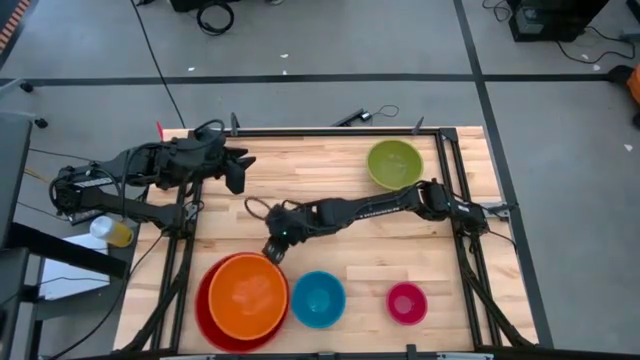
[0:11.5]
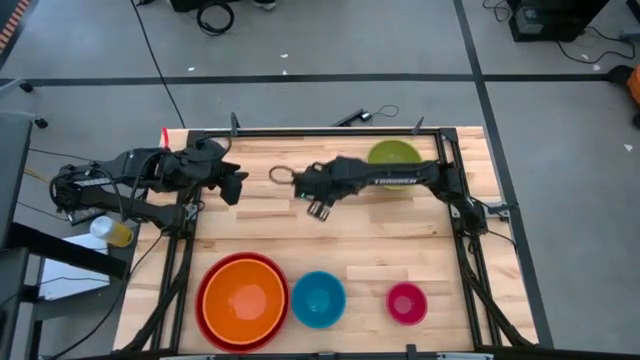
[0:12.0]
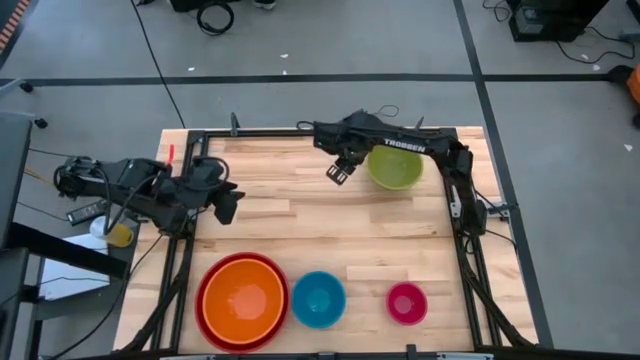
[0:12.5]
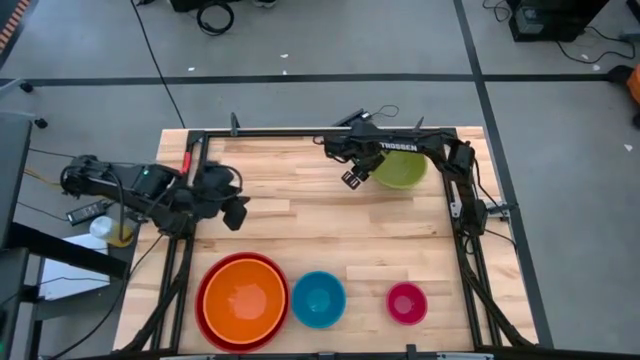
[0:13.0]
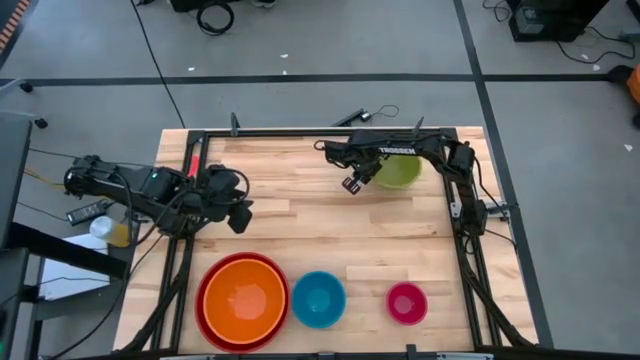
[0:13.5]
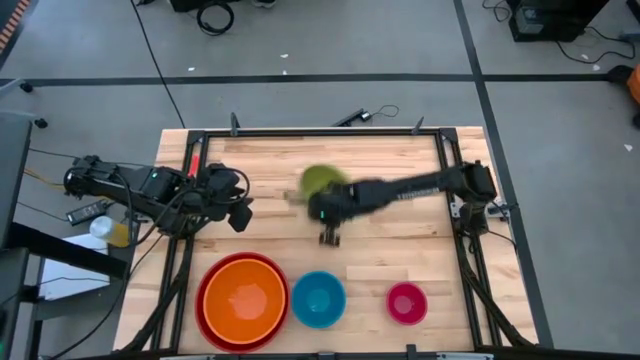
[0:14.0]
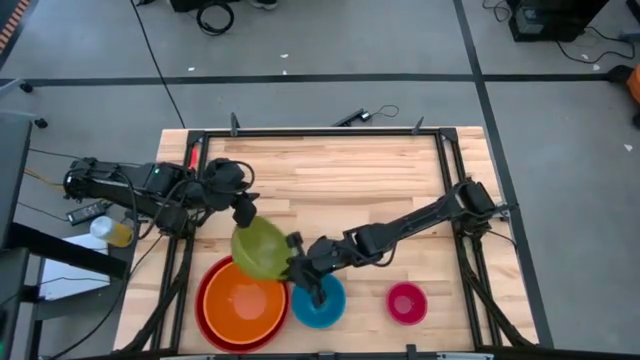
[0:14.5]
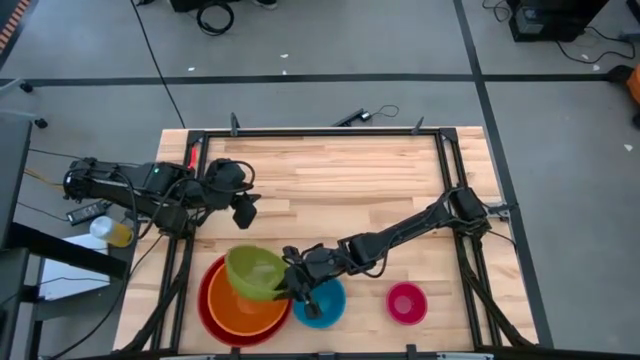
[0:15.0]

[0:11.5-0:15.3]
Stack the green bowl on top of the orange bowl

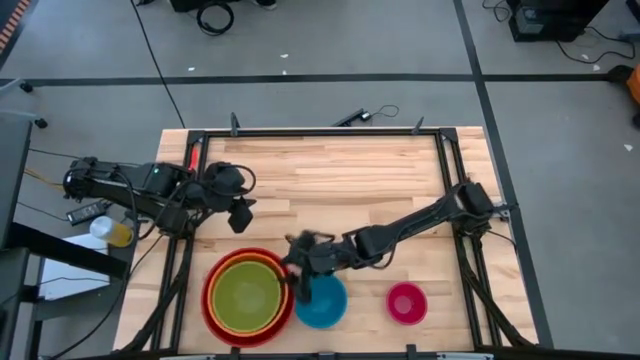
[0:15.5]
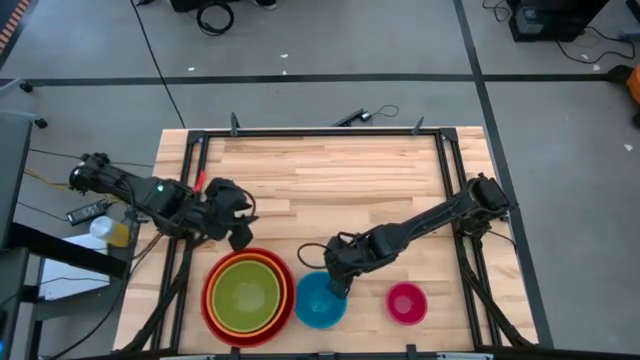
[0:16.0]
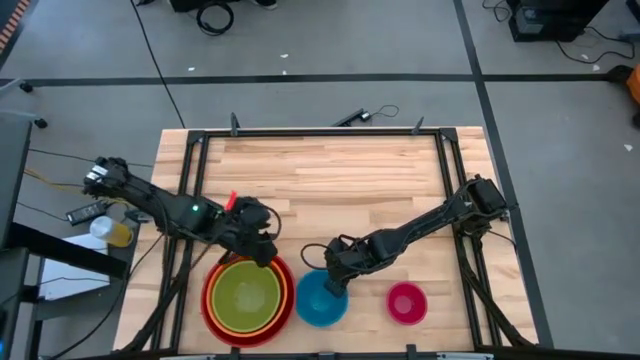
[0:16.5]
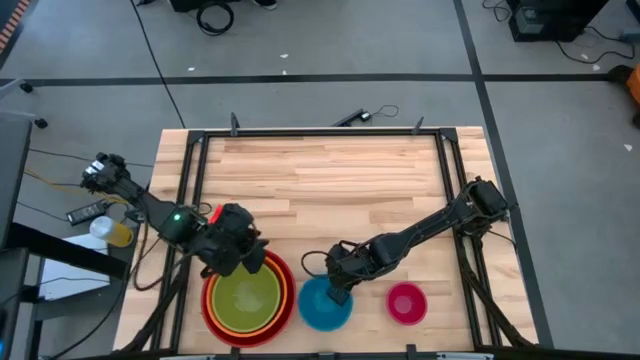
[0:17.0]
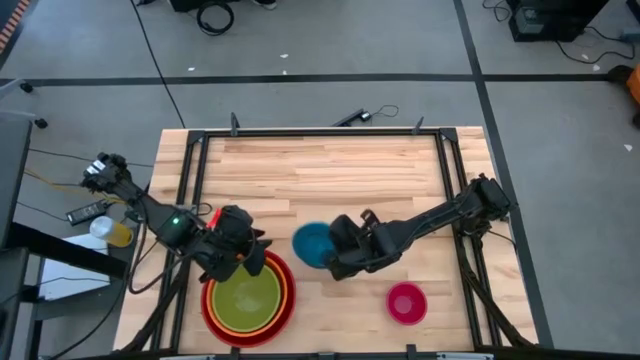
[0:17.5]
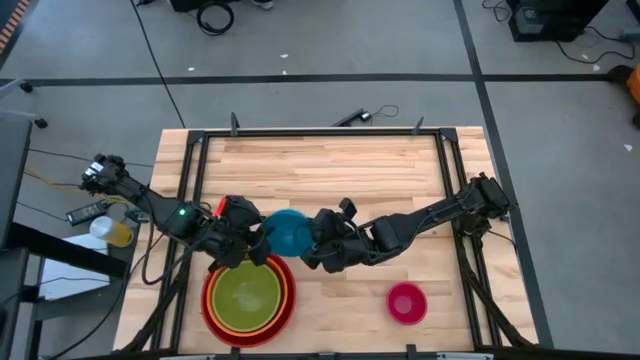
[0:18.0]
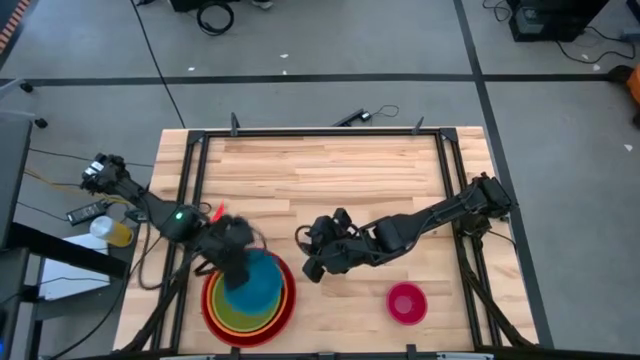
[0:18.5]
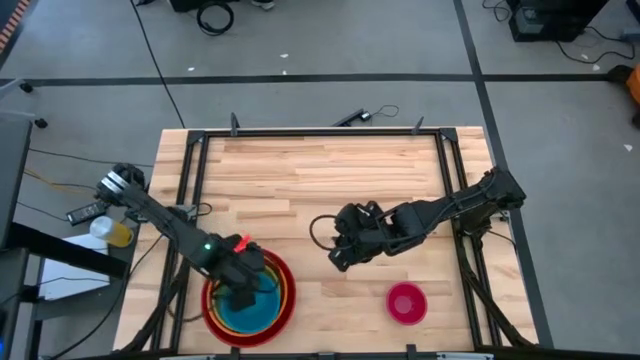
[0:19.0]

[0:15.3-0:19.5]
Stack the blue bowl on top of the green bowl

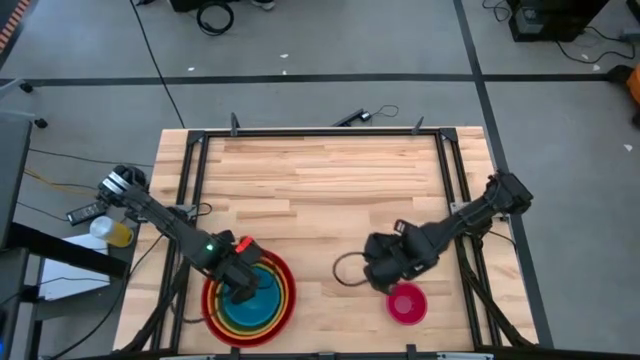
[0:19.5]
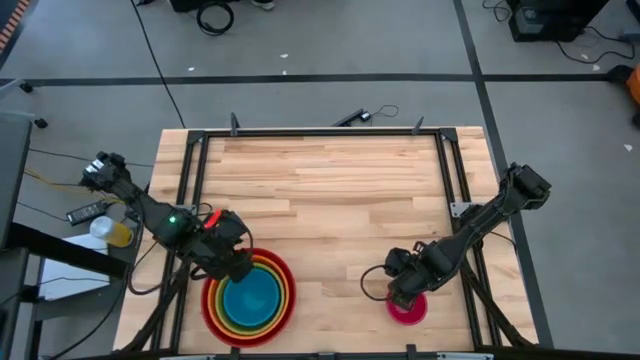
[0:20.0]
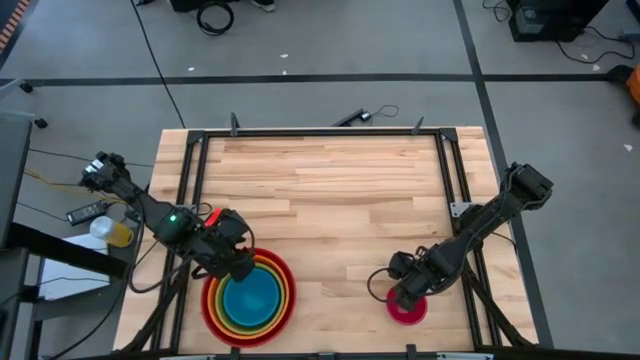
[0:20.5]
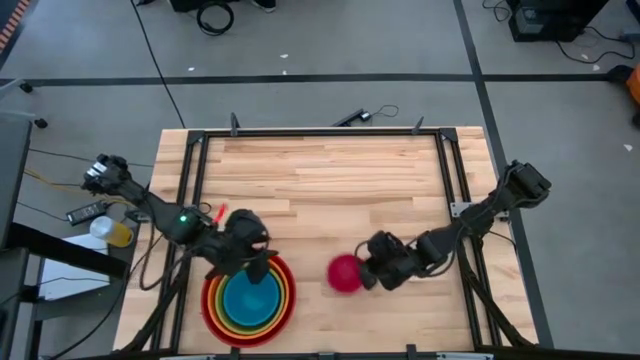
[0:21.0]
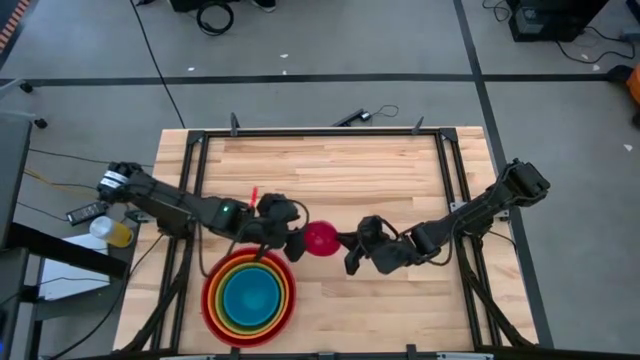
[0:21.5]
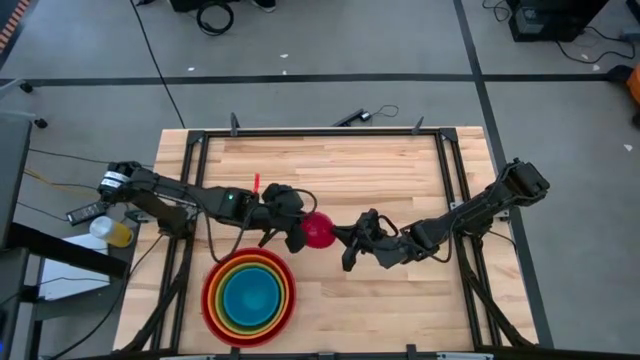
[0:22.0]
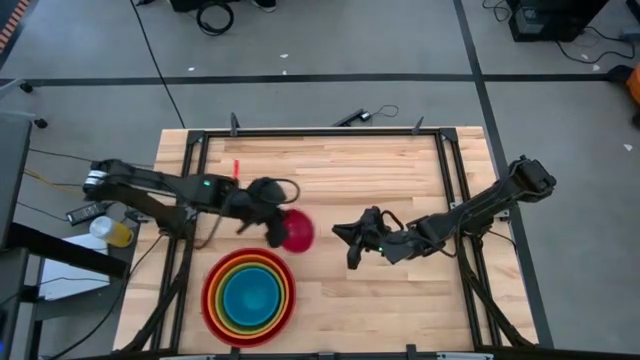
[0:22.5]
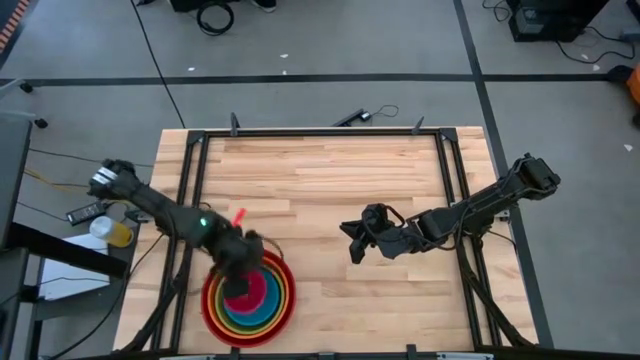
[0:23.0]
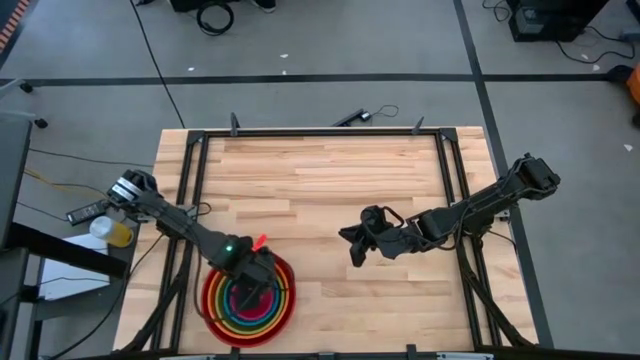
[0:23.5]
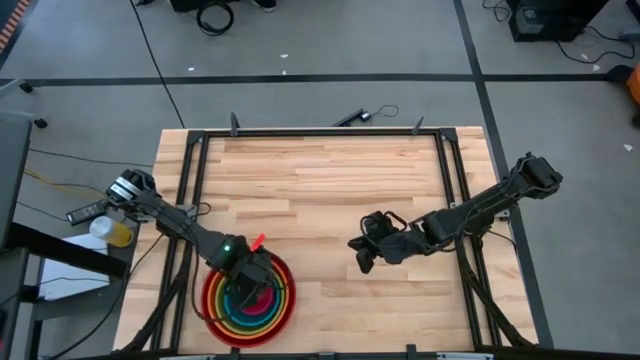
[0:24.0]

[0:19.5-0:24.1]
Stack the pink bowl on top of the blue bowl

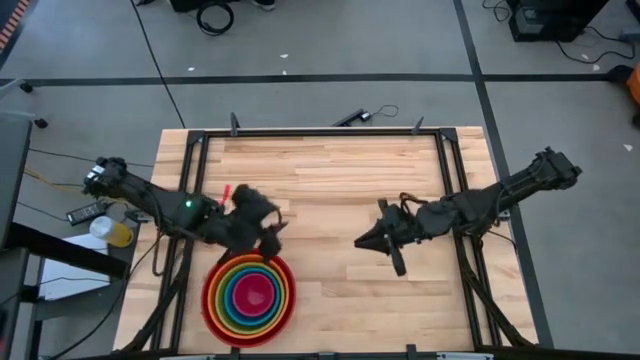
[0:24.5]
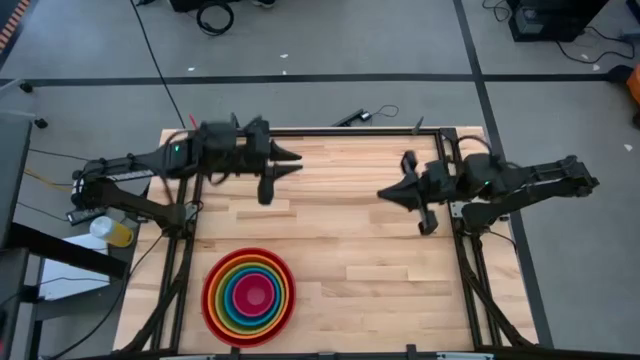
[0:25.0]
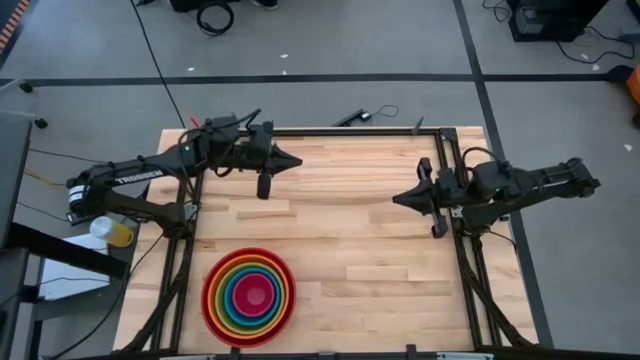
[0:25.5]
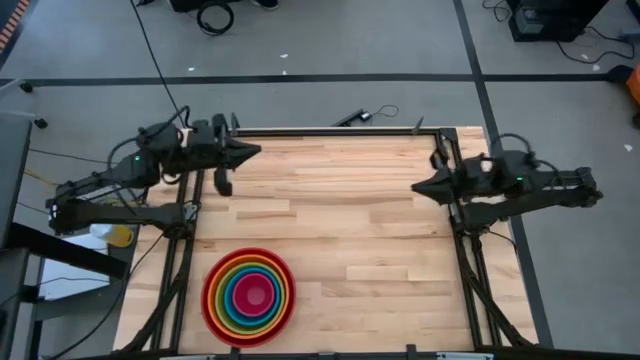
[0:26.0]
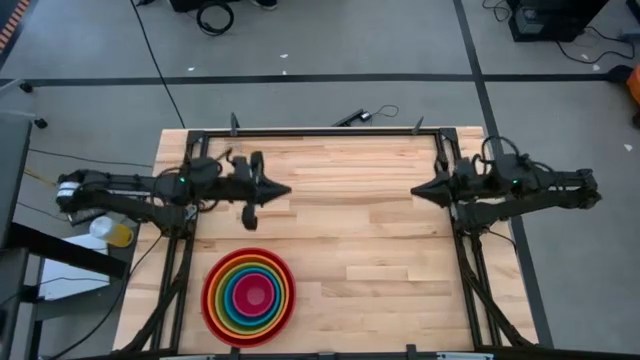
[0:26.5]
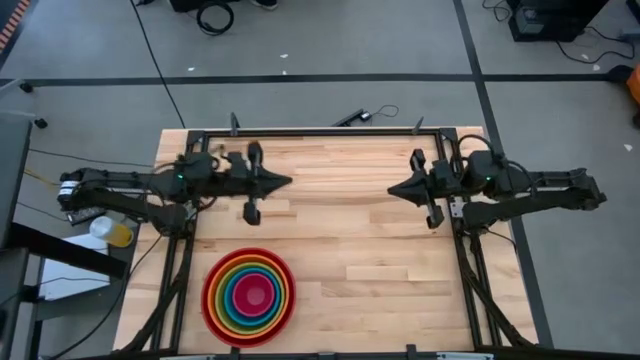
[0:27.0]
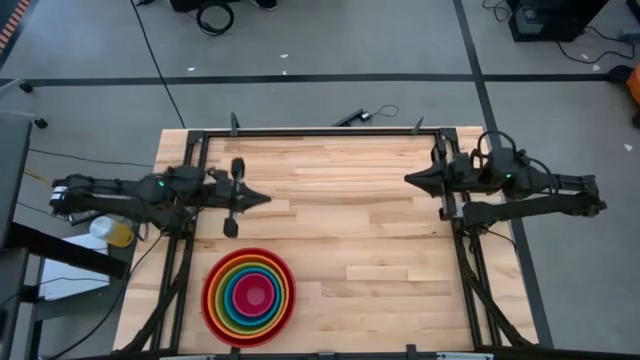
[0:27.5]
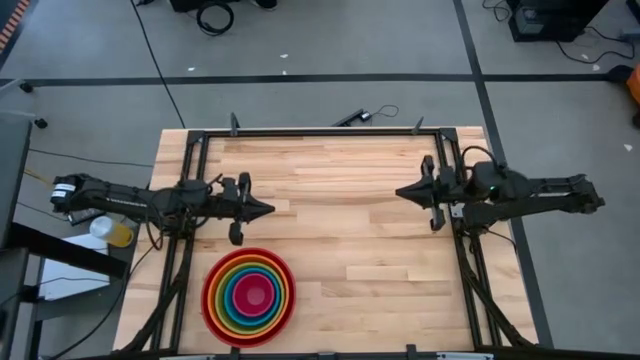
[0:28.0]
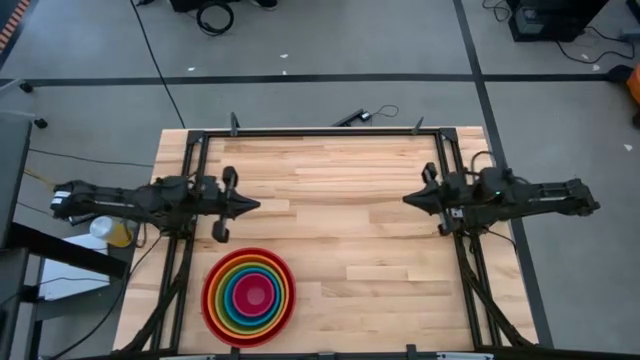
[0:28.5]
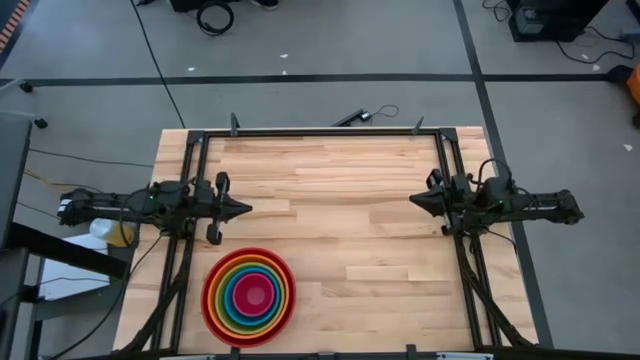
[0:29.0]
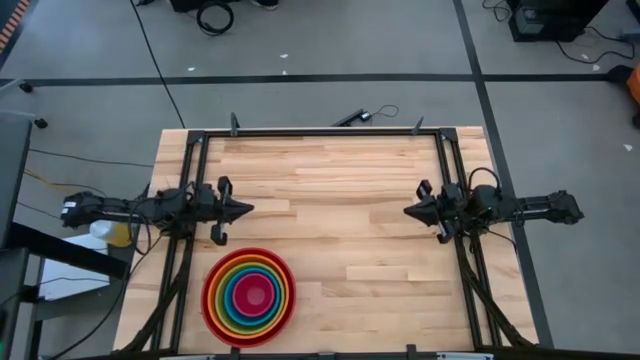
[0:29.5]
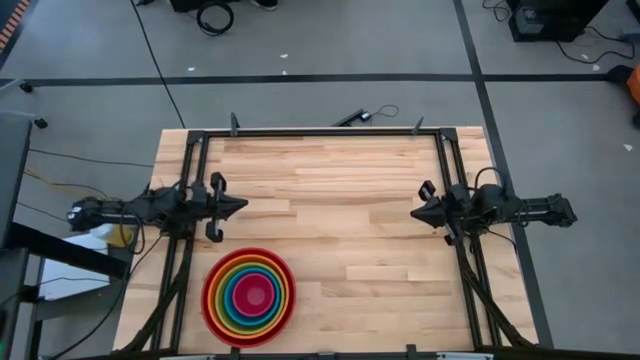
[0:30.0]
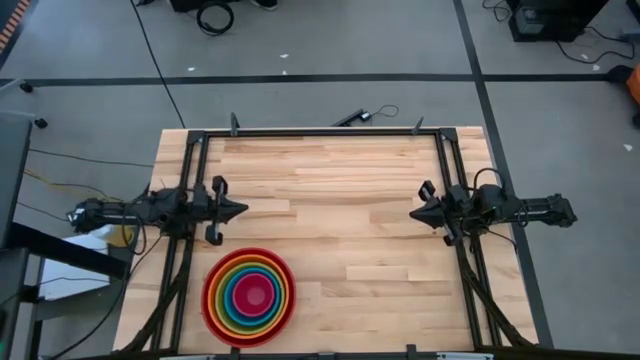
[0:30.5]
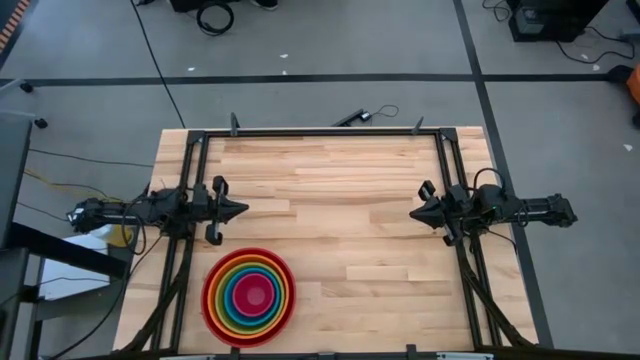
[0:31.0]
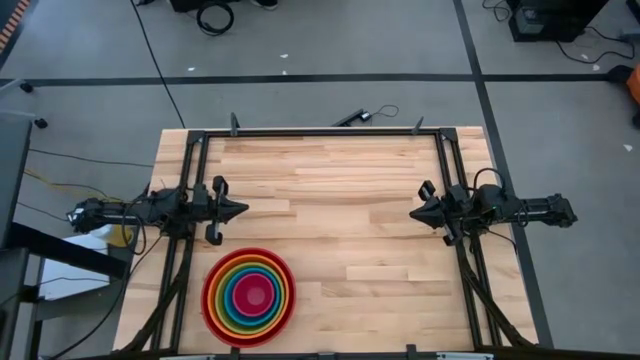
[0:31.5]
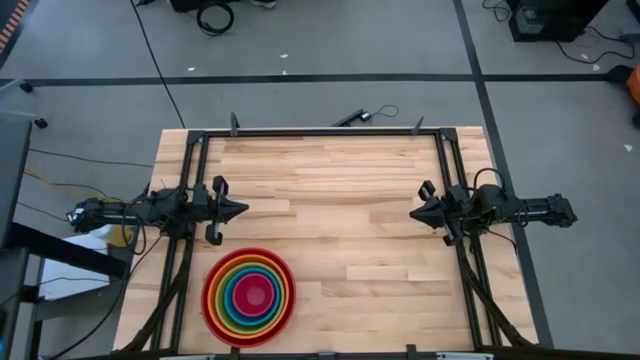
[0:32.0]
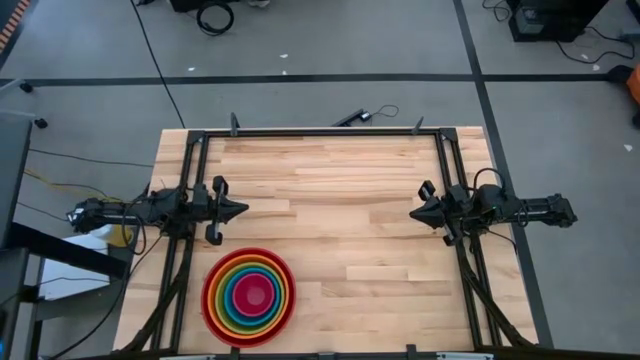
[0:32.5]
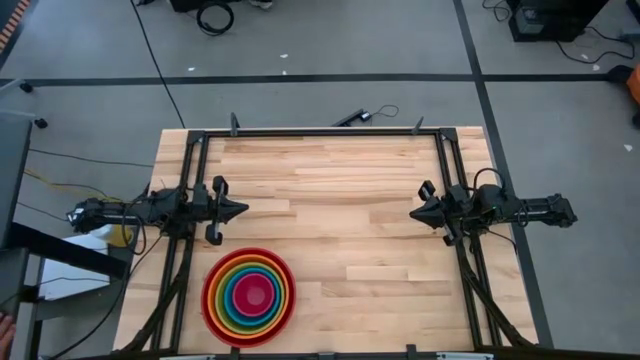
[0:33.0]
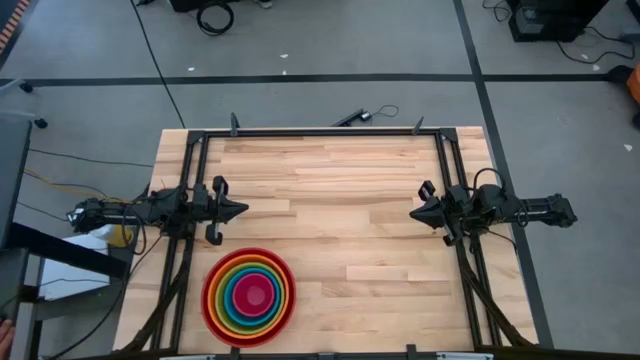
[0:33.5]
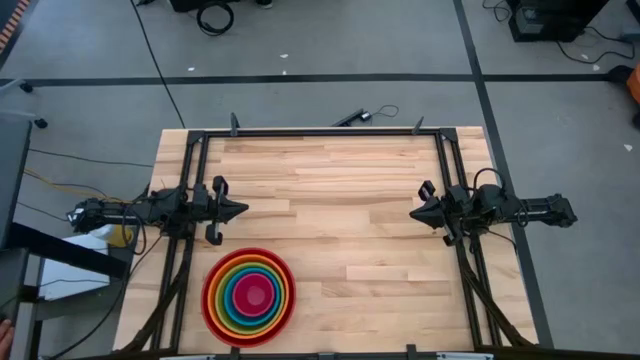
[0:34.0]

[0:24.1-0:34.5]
Return to Home Position
